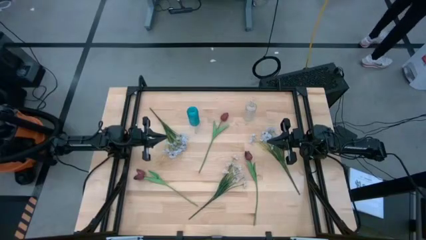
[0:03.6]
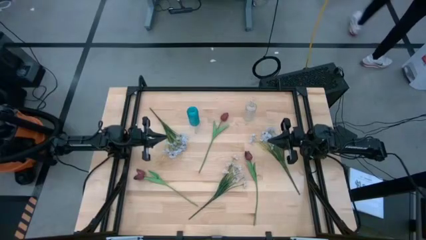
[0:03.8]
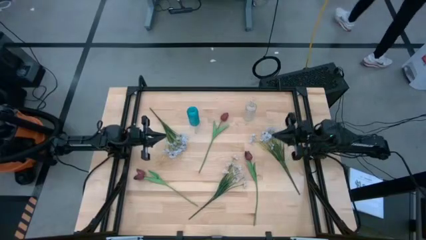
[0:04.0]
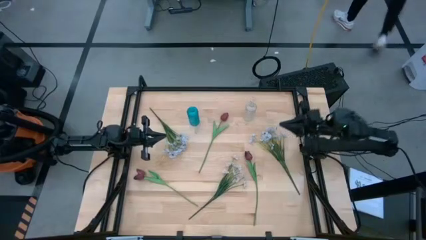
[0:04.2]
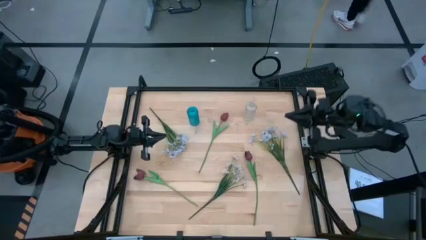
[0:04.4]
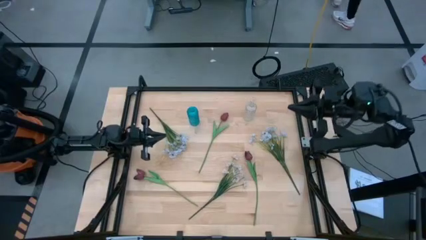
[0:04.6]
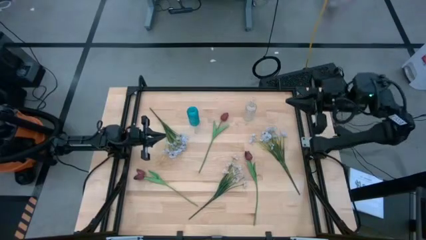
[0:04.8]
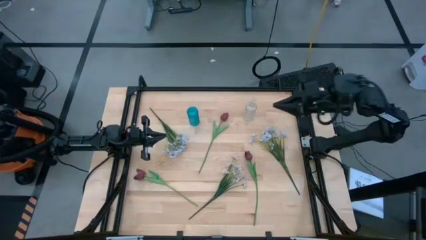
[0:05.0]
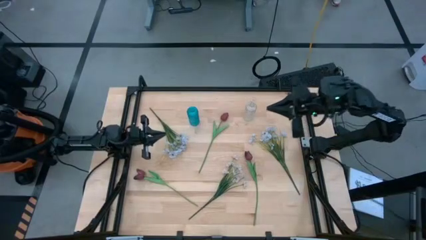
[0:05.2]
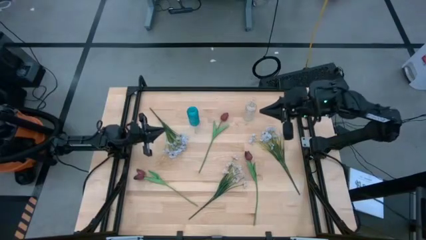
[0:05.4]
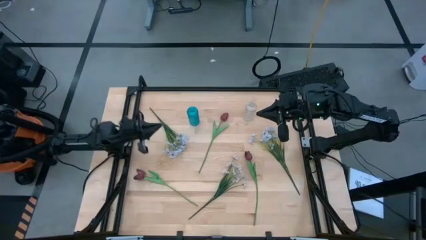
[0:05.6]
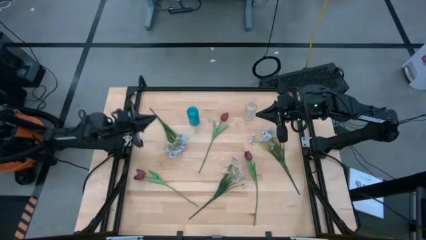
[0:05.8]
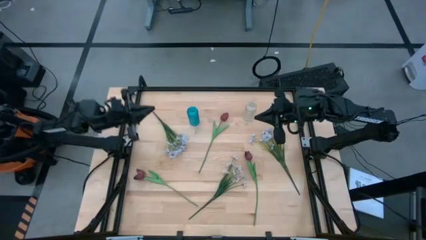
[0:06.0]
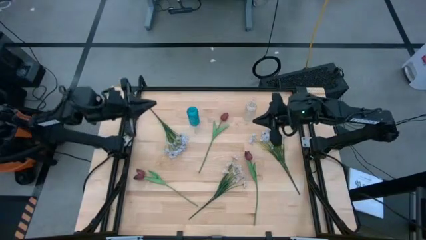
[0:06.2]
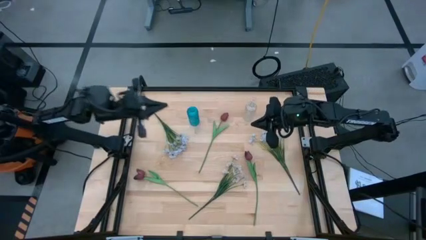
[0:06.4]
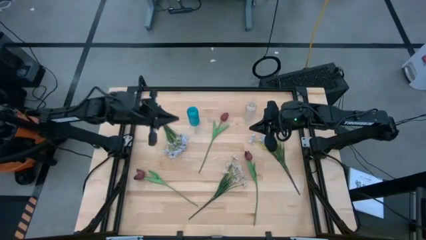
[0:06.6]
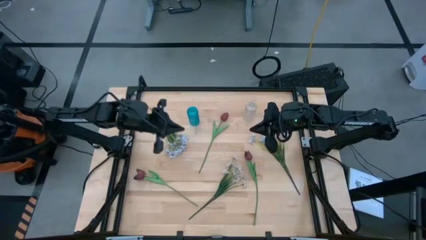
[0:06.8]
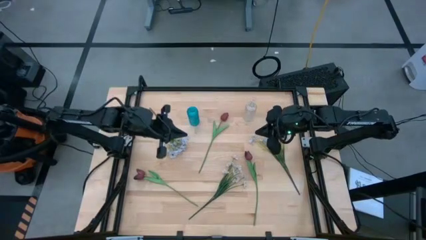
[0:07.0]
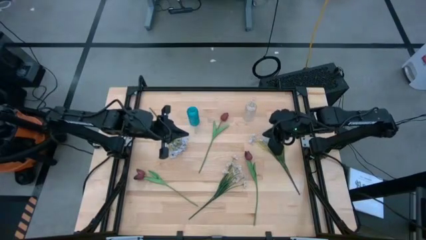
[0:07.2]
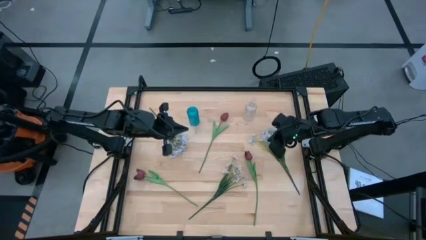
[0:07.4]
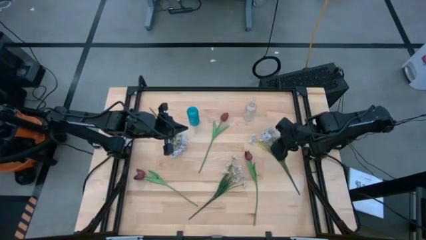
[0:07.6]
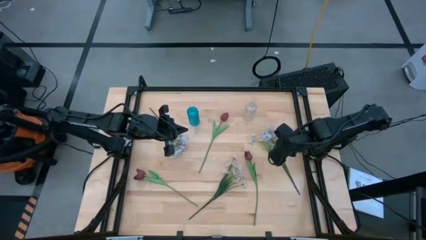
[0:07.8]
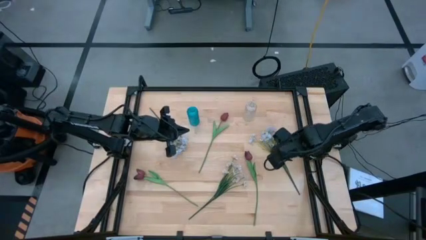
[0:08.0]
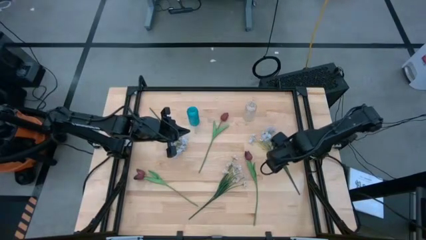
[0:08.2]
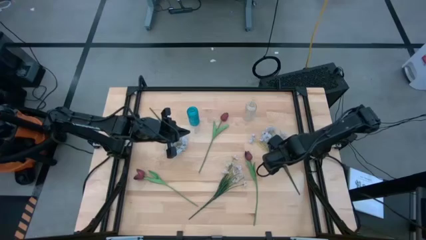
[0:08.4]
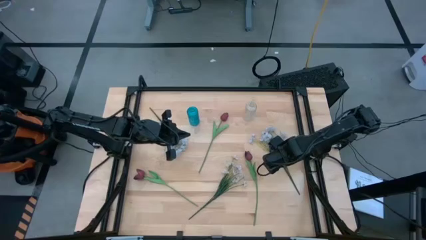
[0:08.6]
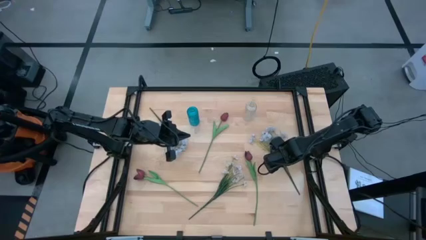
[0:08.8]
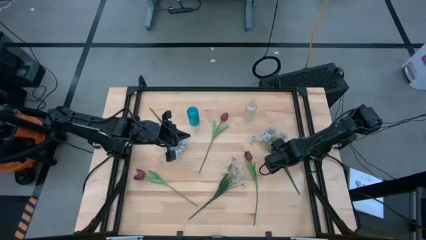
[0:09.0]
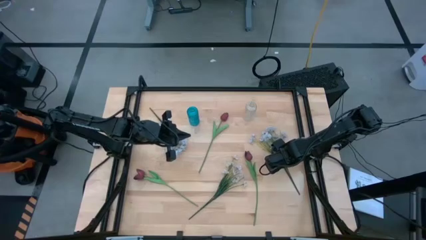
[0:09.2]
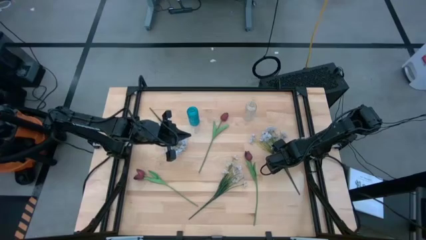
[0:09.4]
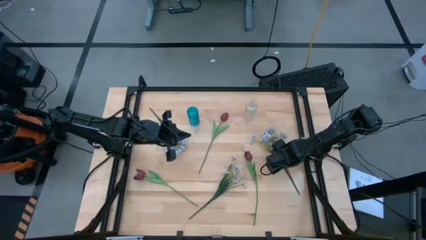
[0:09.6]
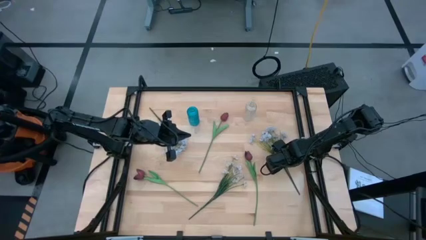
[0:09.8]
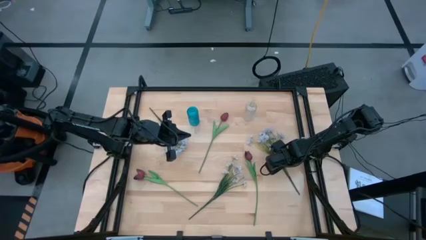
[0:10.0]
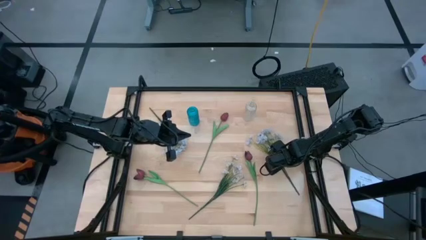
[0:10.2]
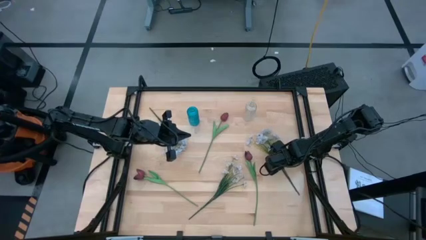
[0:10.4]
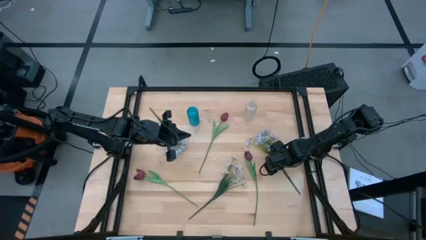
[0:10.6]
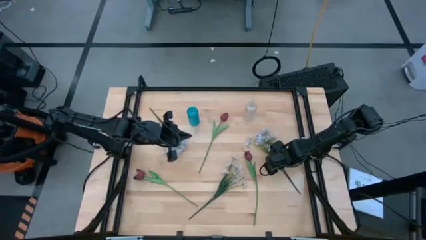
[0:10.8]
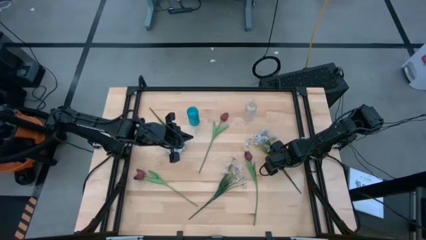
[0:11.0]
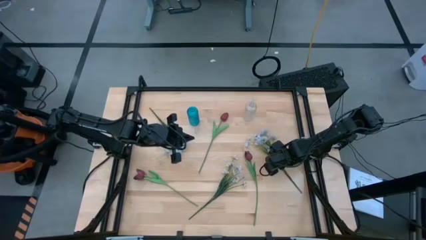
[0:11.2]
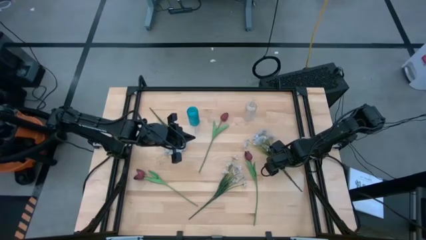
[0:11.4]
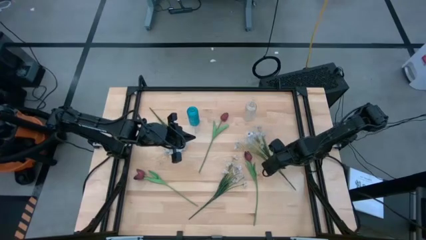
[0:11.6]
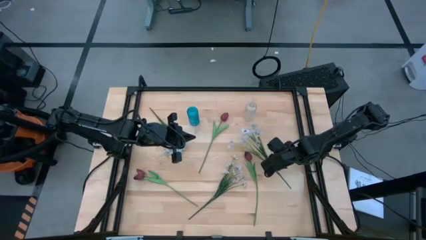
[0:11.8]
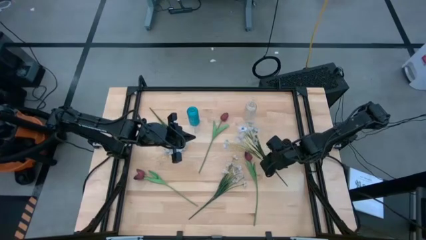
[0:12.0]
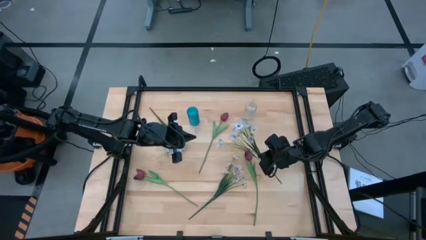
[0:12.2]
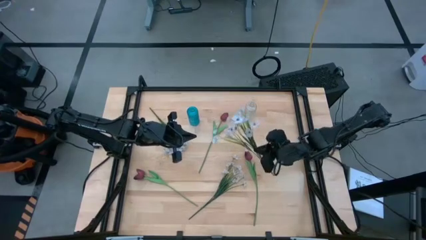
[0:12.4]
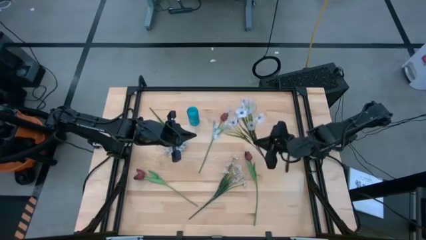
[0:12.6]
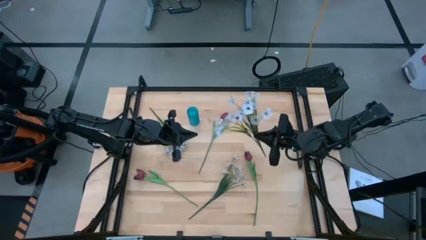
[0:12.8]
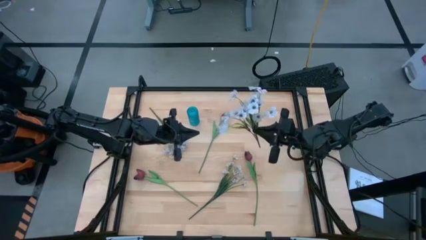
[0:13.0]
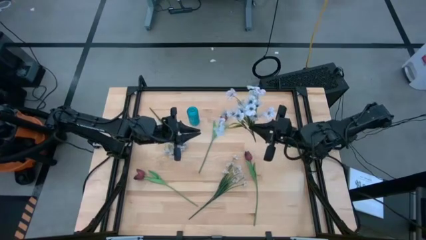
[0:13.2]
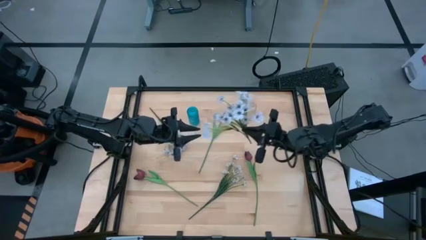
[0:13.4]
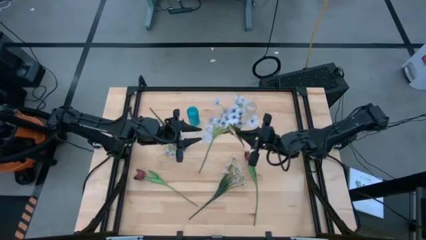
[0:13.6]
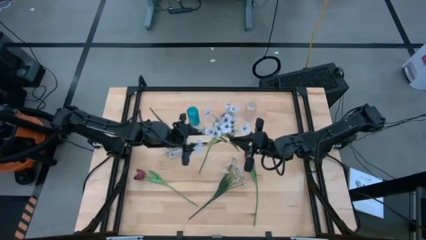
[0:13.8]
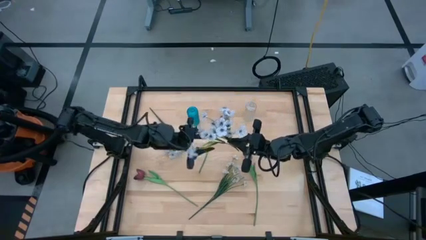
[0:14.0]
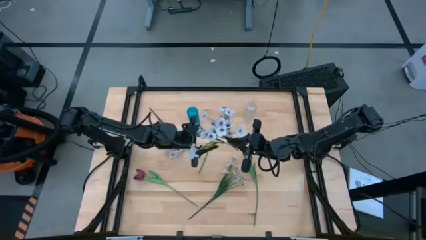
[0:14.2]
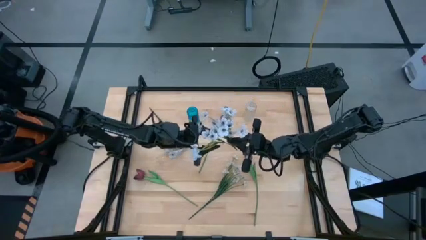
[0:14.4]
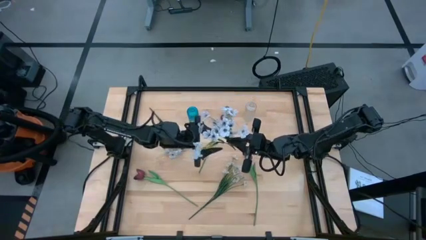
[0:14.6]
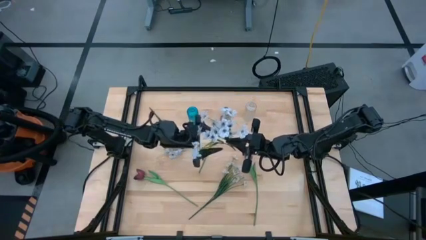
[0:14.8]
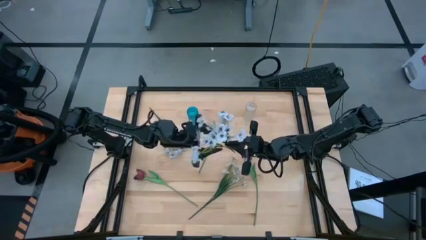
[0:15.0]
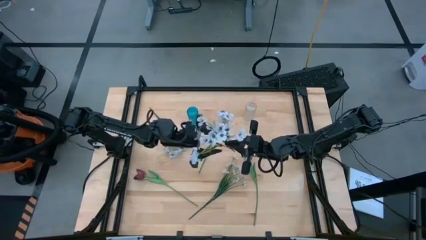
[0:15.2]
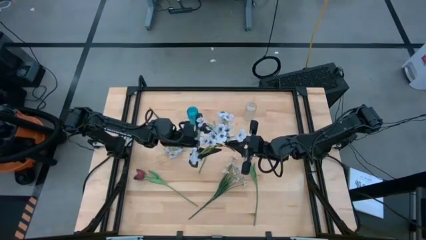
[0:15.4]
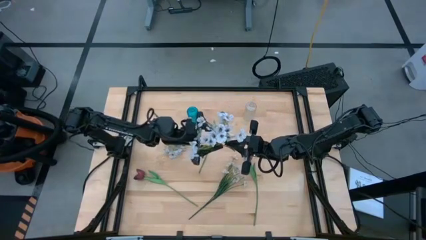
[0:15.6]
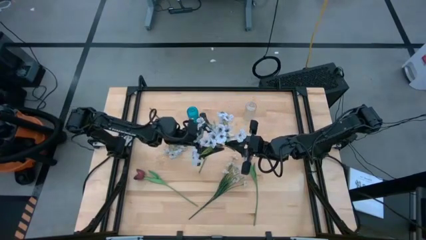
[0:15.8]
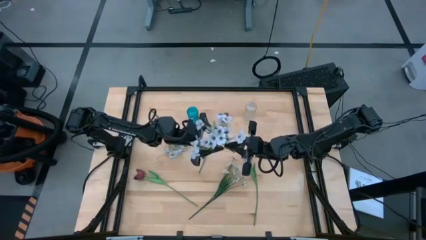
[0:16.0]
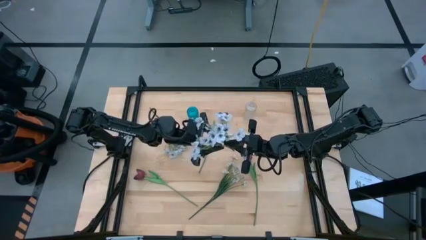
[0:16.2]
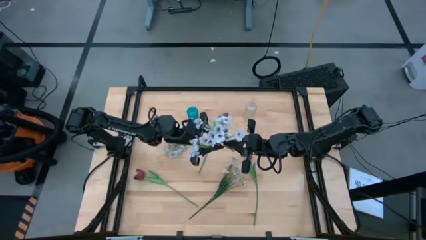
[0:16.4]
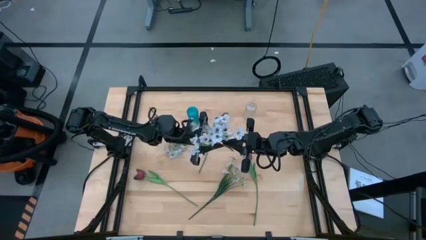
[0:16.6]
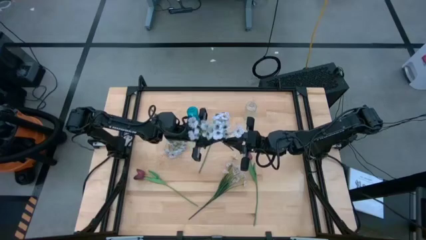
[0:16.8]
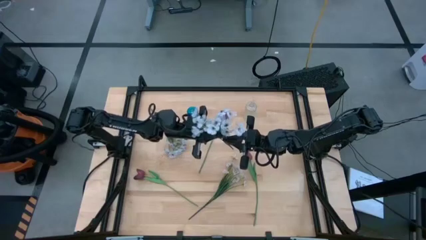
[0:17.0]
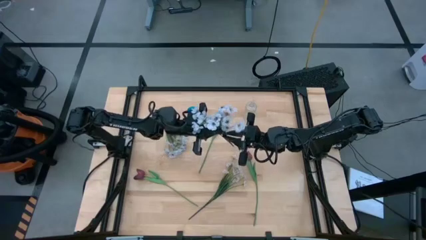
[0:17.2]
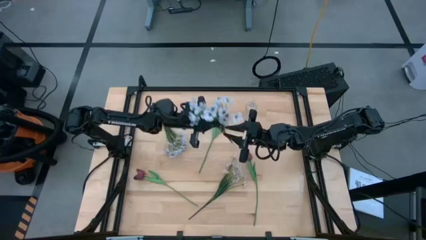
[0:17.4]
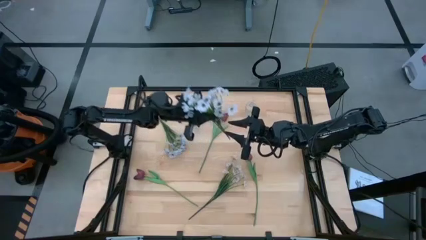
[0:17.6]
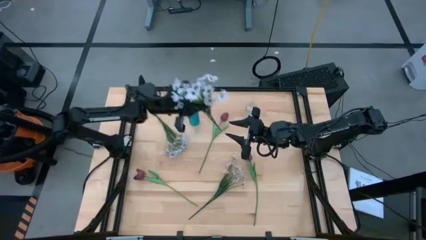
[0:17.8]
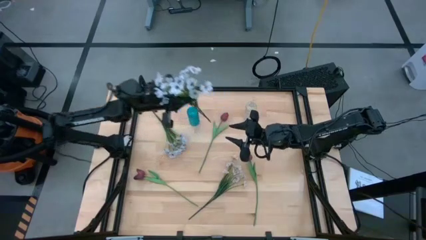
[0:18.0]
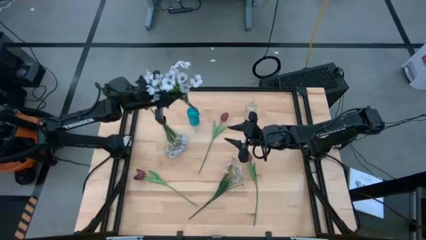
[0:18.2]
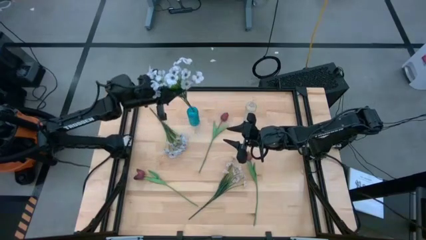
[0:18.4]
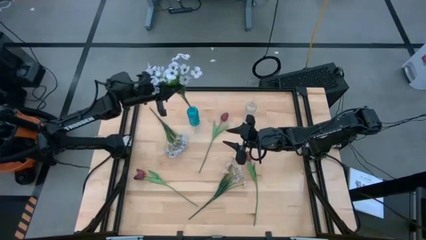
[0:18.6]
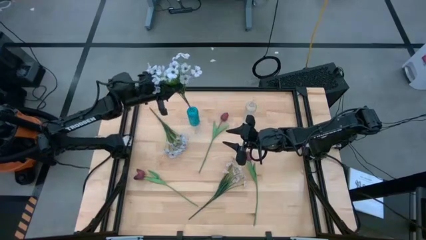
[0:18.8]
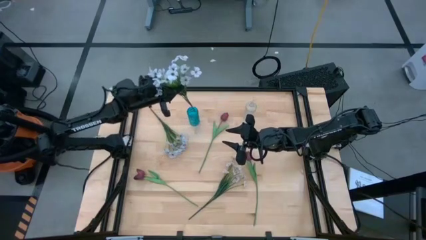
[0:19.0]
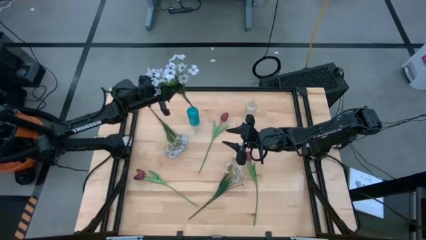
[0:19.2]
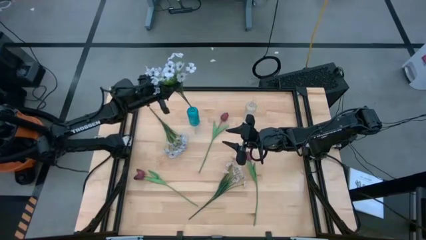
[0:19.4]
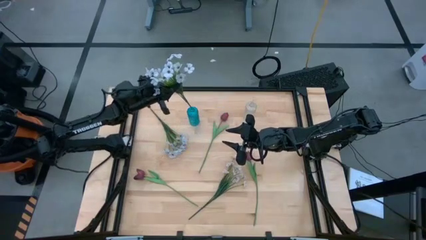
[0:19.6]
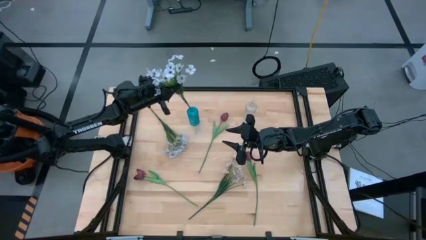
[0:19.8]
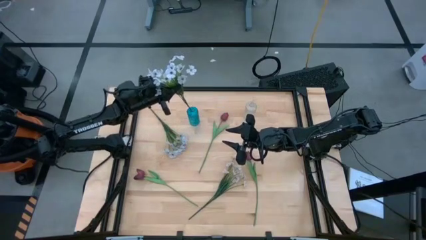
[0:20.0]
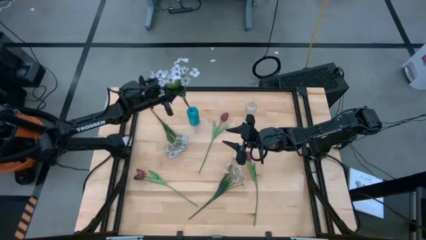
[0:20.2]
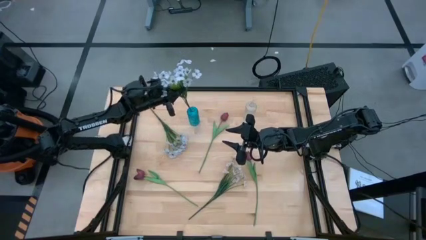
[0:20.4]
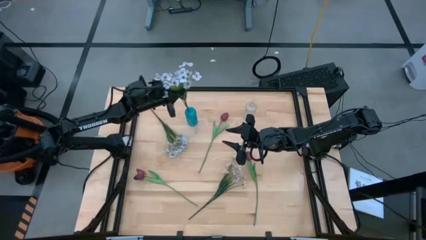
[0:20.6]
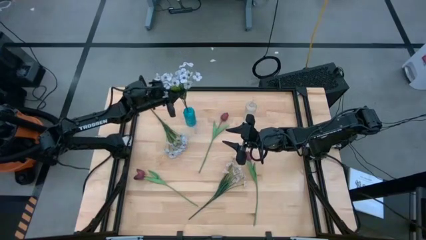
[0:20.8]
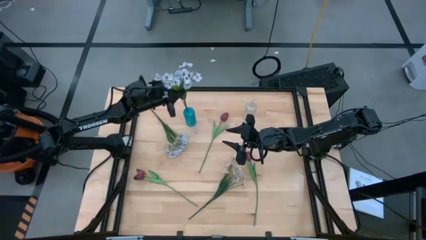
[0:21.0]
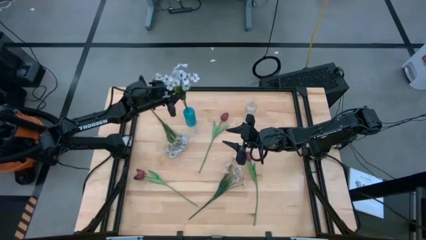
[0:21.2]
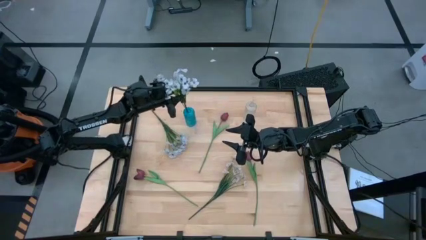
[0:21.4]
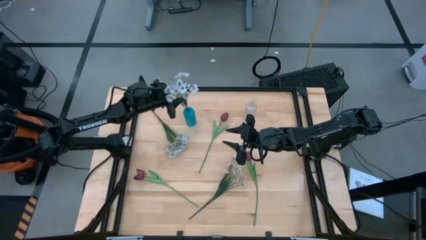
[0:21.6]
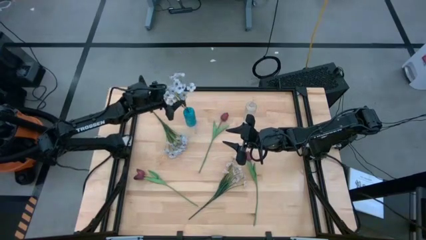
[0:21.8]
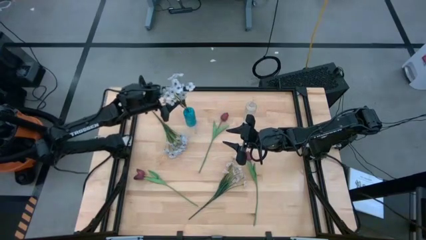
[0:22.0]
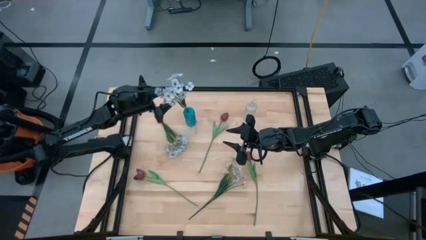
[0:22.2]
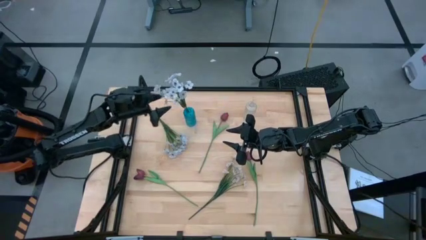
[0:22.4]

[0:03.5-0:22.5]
Task: Sort flowers into vase by color
Put the right white flowers into the blue vase
